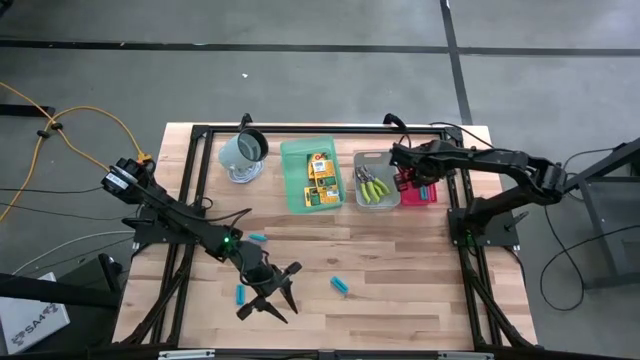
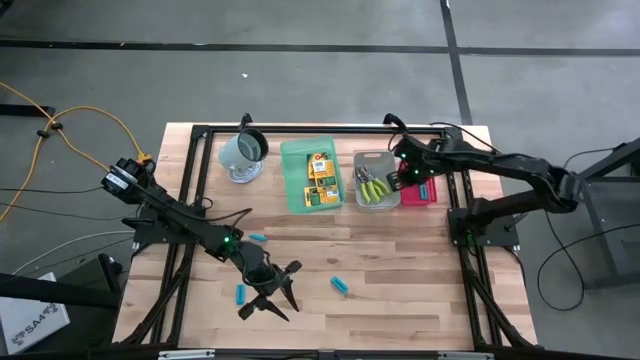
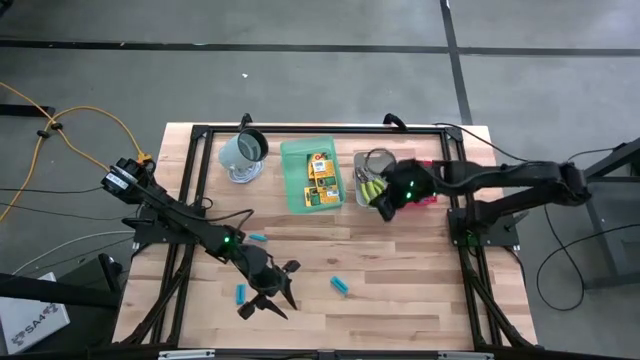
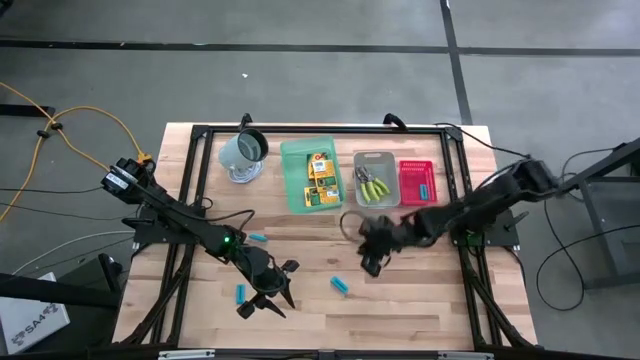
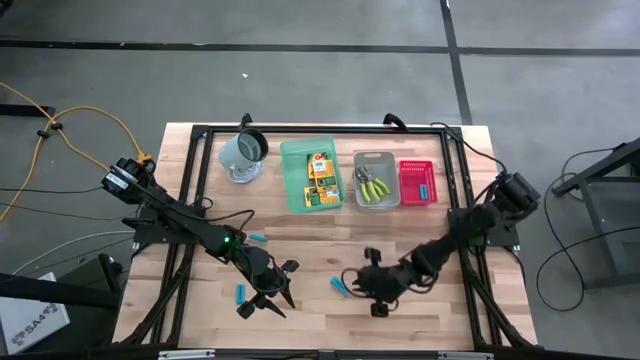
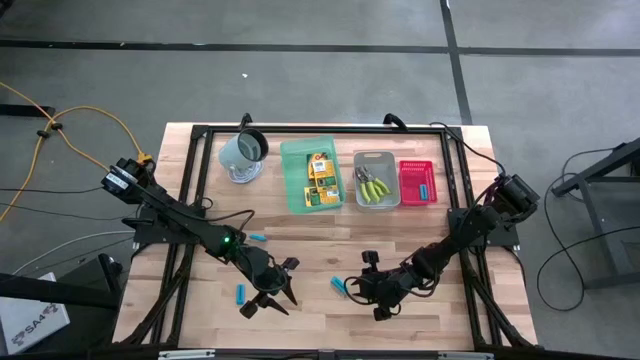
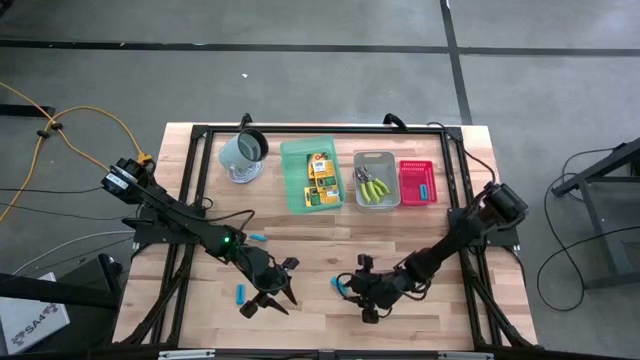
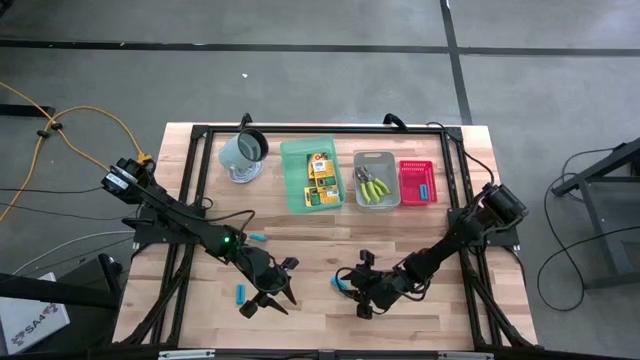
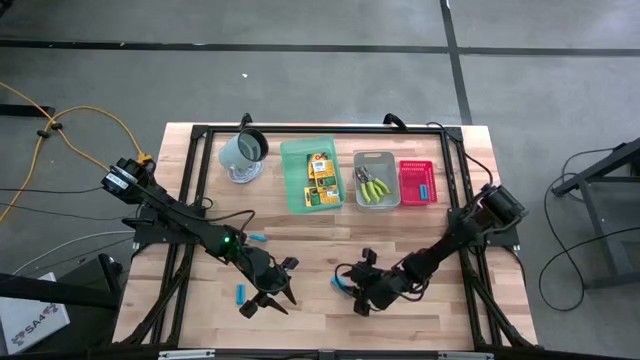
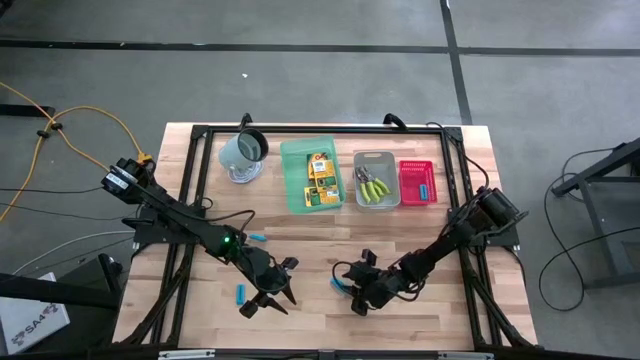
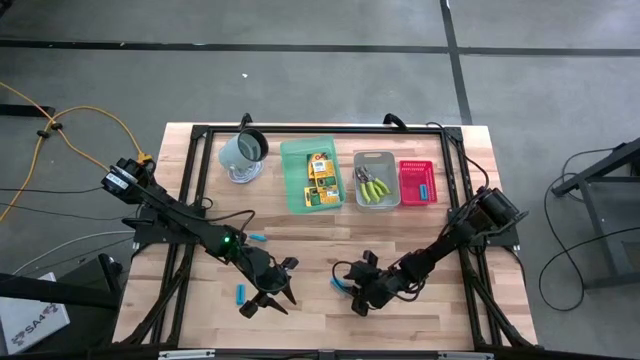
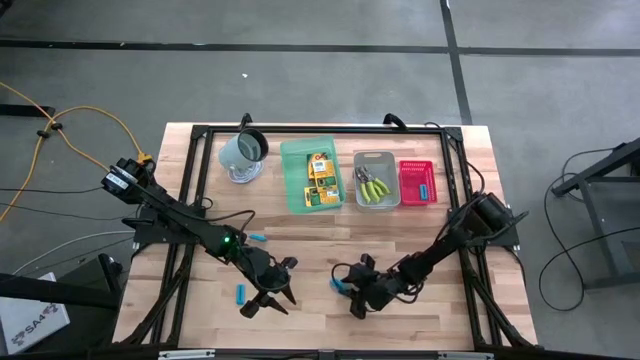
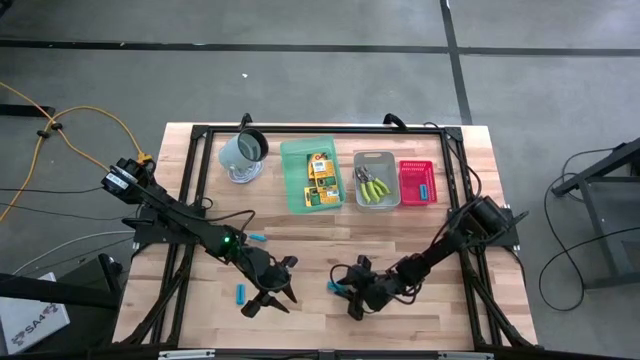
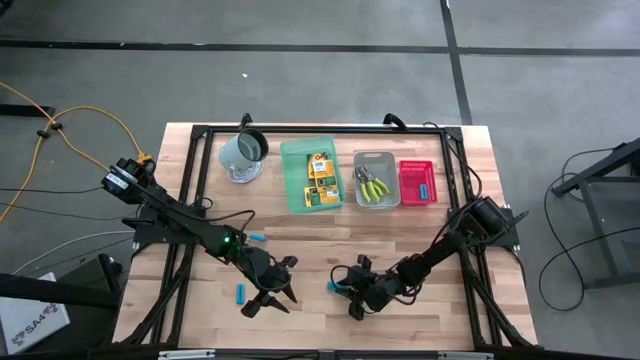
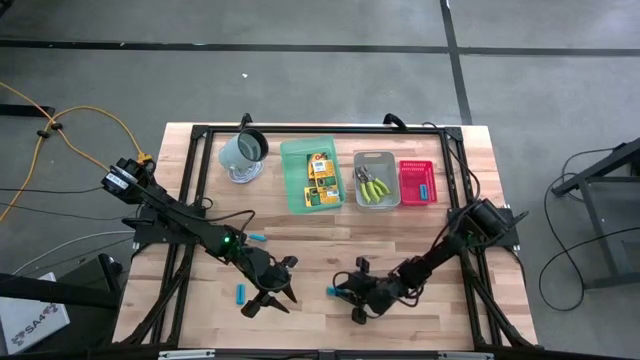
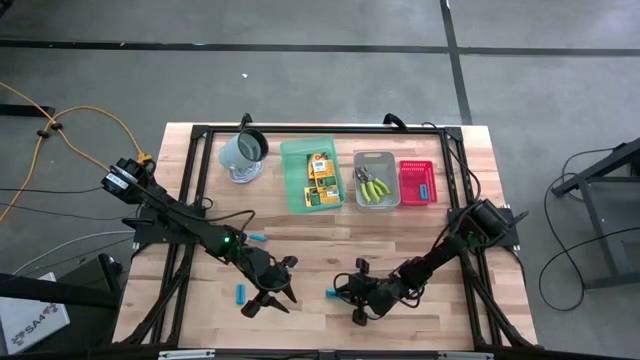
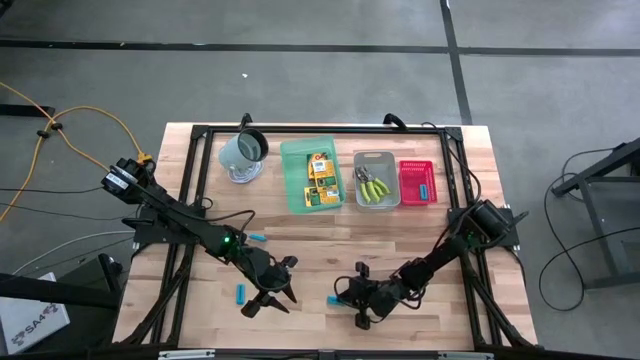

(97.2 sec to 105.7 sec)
Task: Pick & Place School Supplies
Put the right blue eraser into the red bin

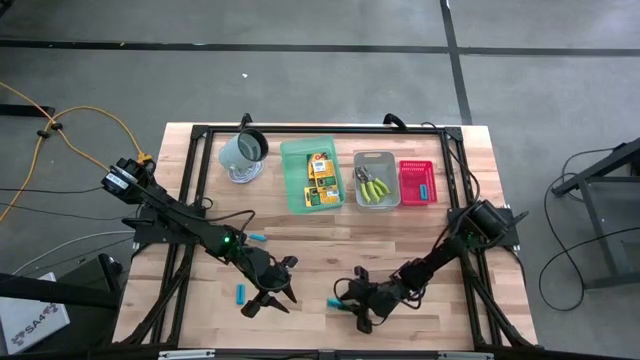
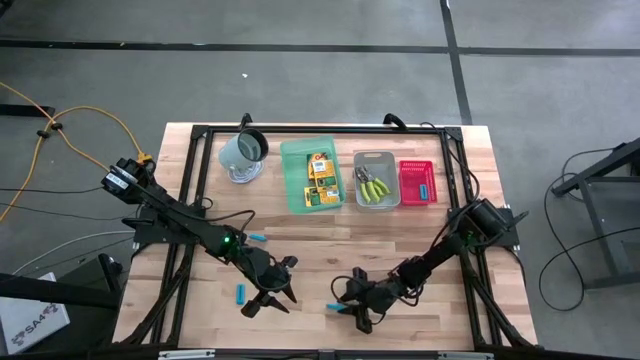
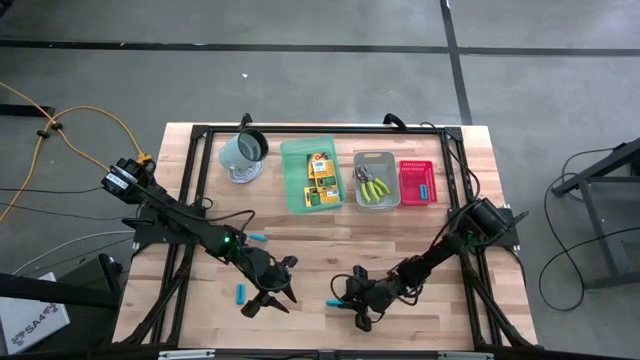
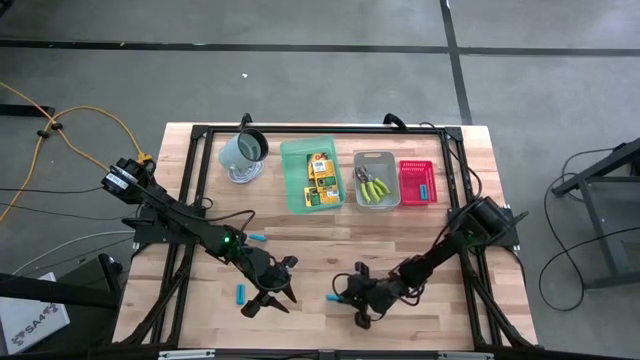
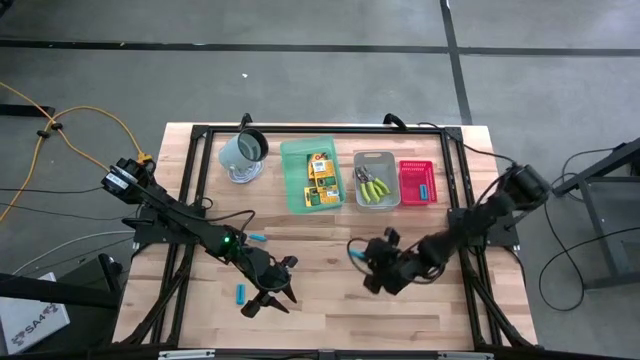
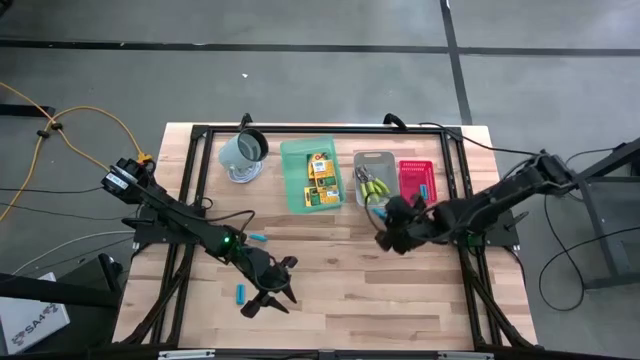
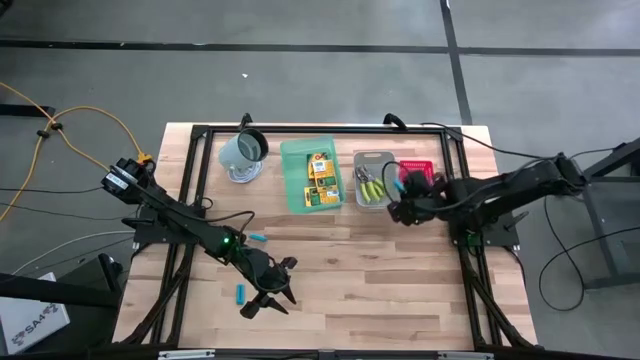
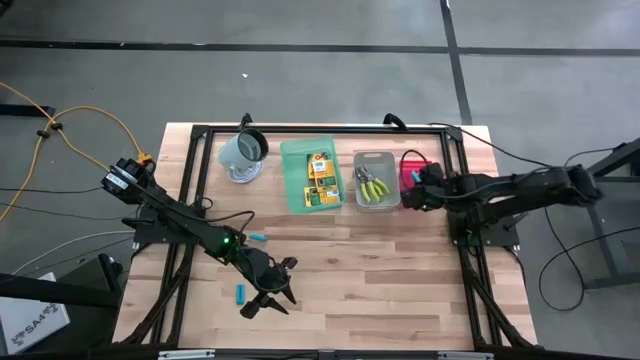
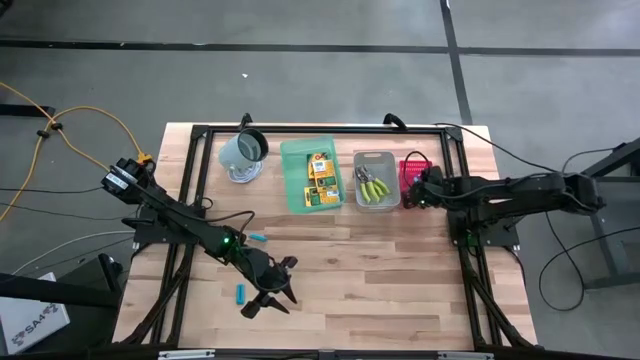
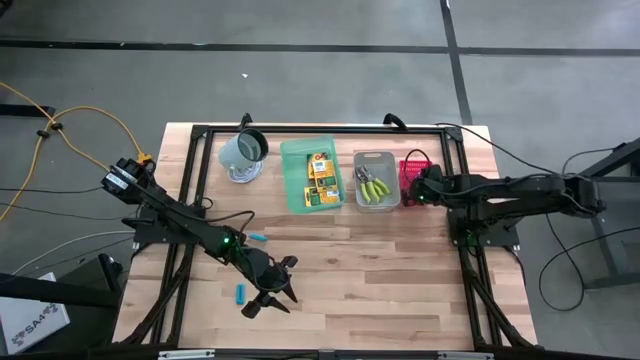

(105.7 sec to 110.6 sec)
Put the right blue eraser into the red bin

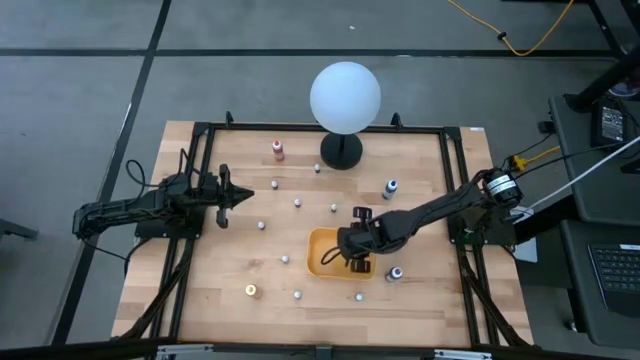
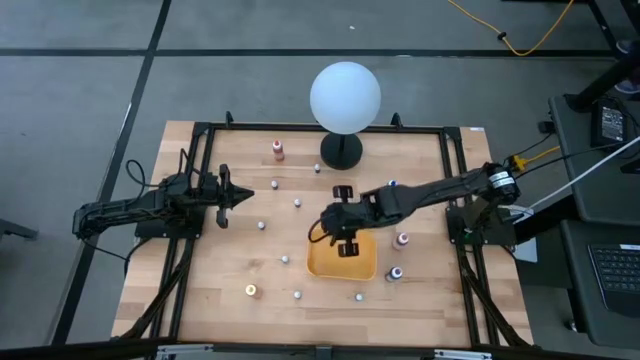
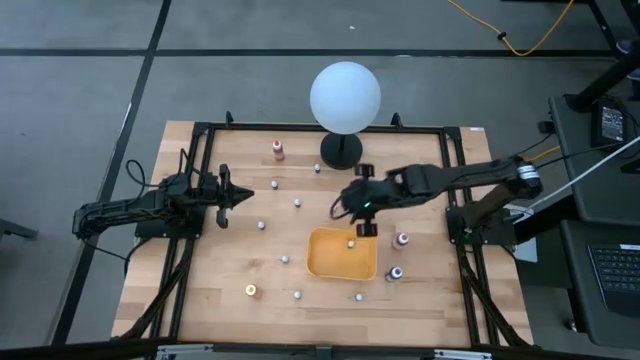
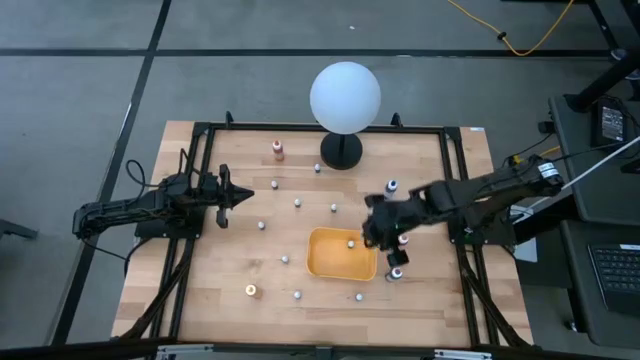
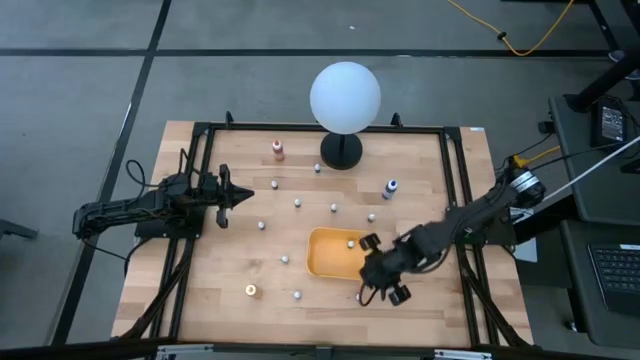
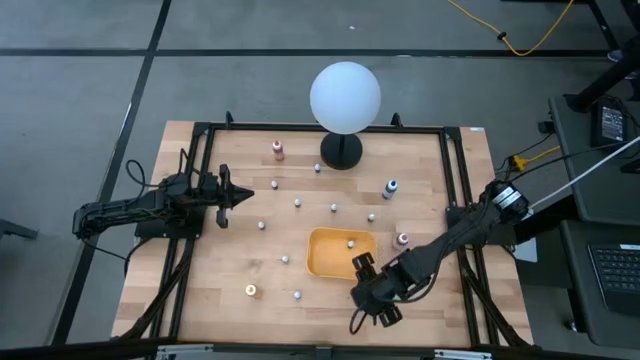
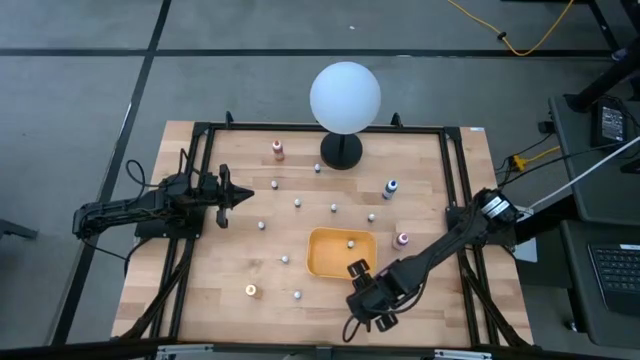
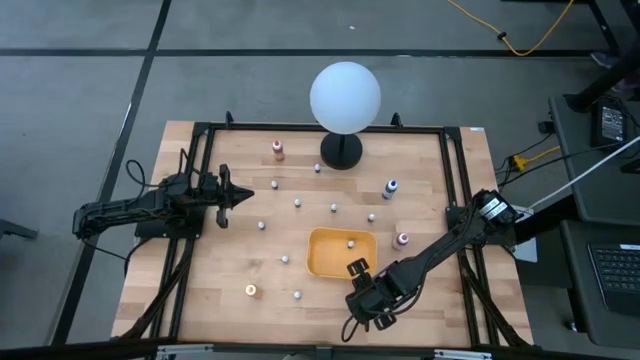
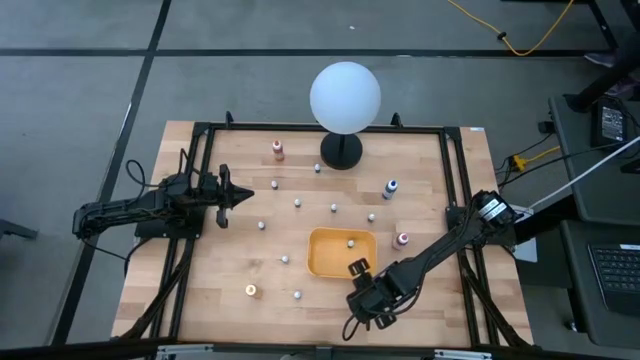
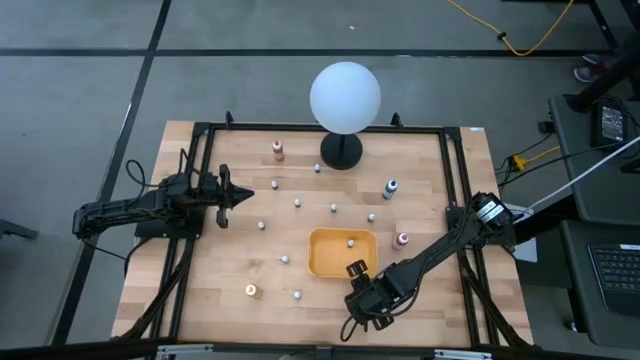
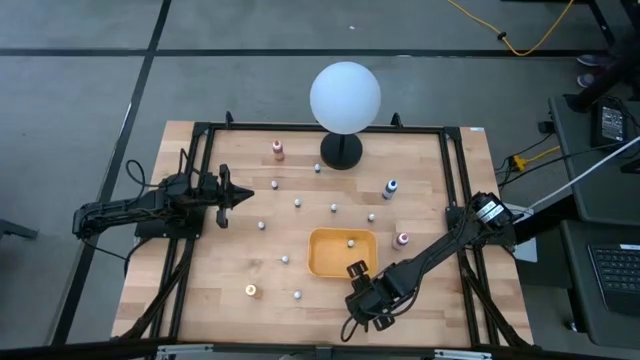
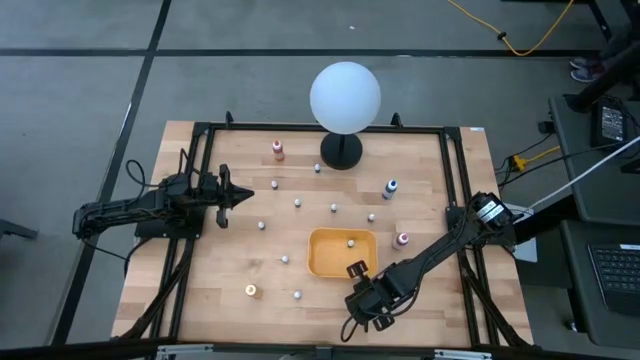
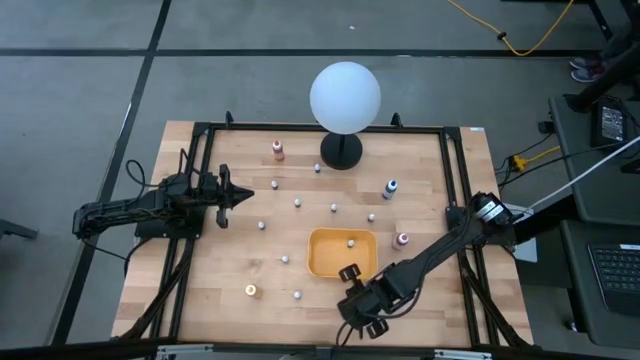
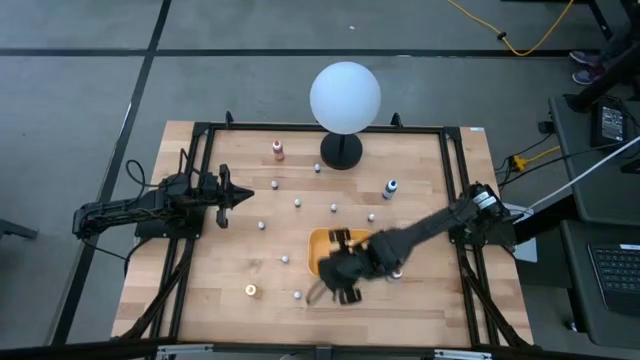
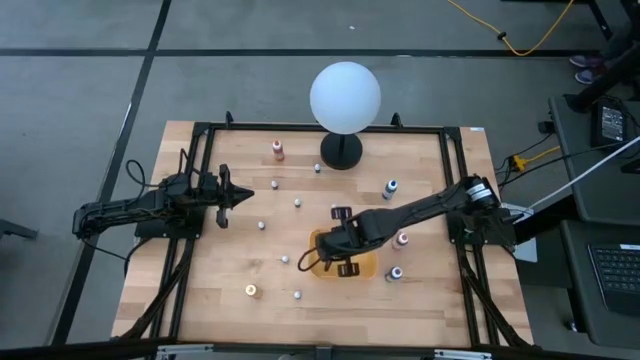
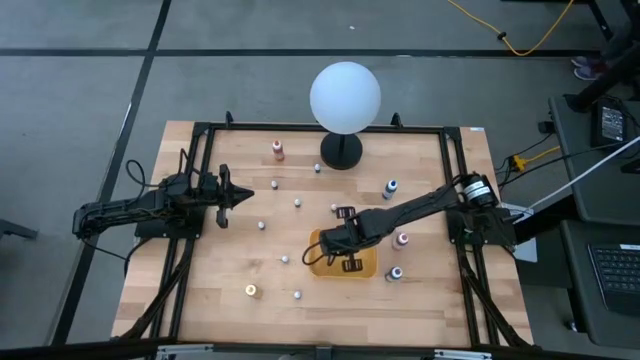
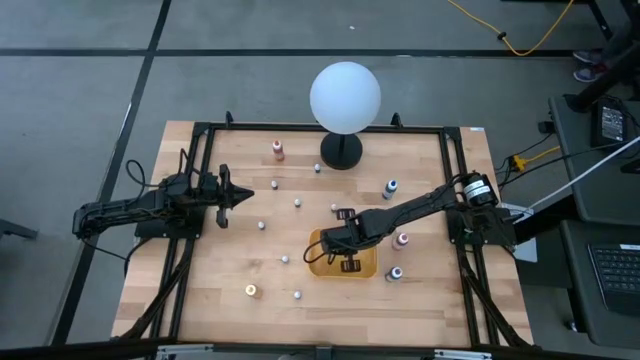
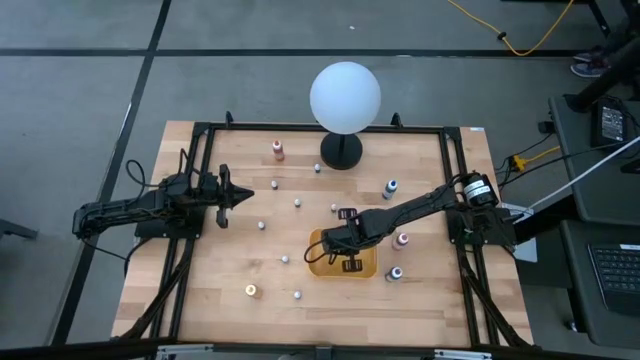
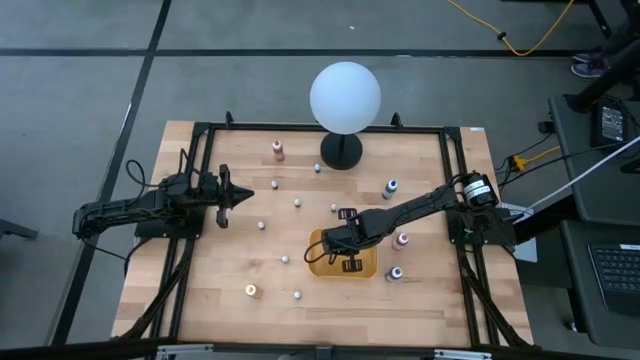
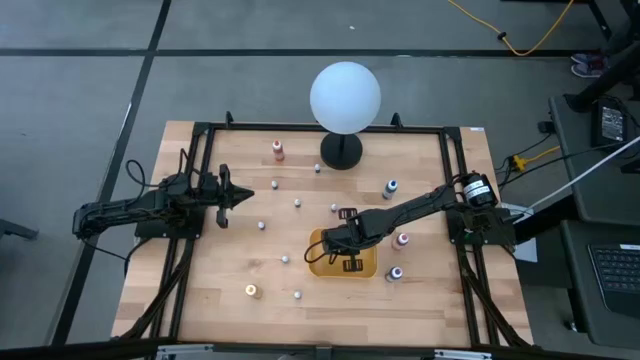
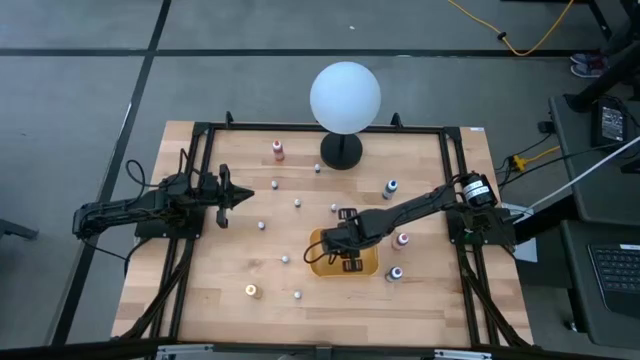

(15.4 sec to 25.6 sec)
Task: Pick & Place food coloring
Put the small blue food coloring bottle into the yellow bin
